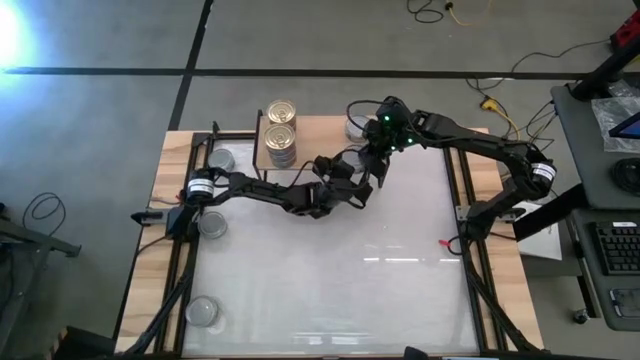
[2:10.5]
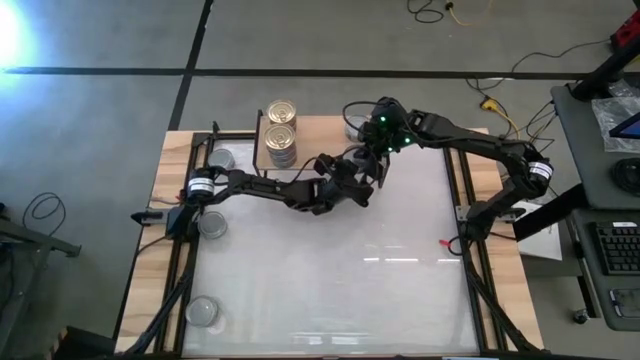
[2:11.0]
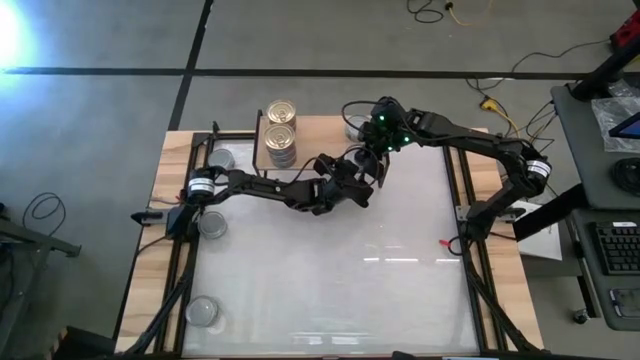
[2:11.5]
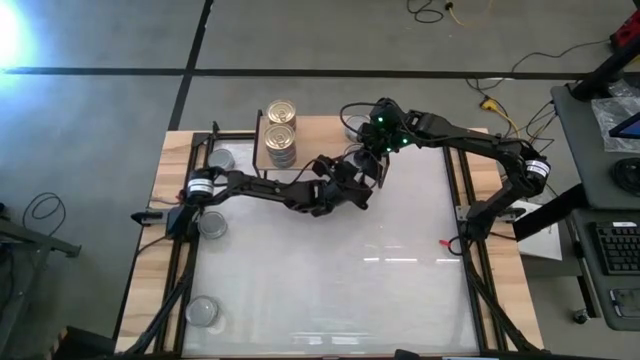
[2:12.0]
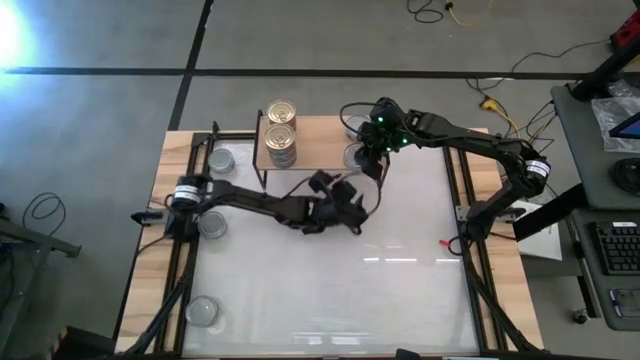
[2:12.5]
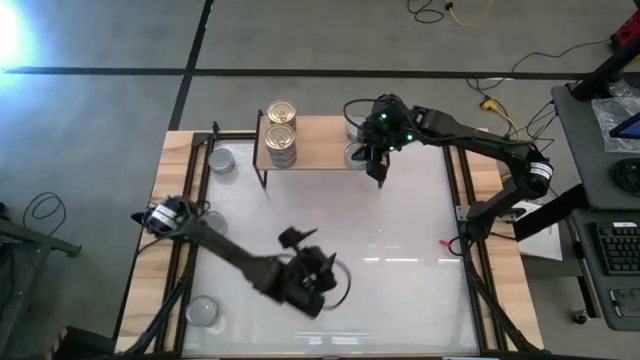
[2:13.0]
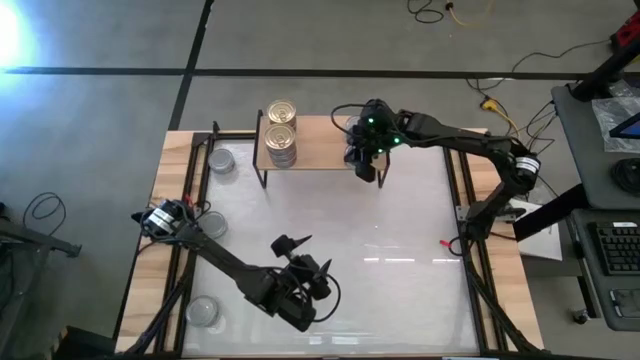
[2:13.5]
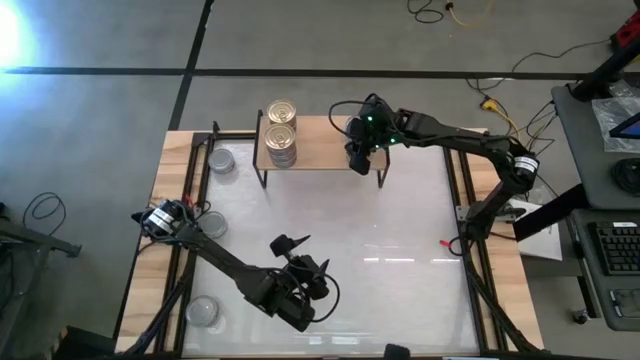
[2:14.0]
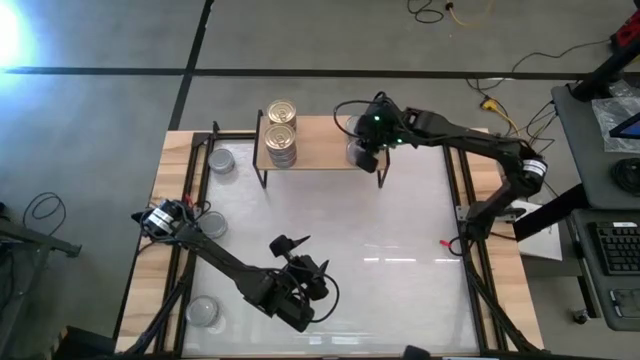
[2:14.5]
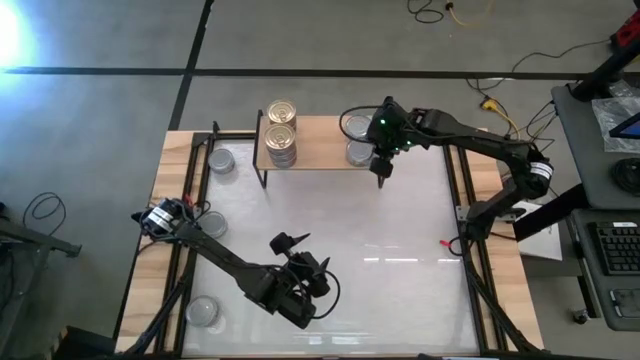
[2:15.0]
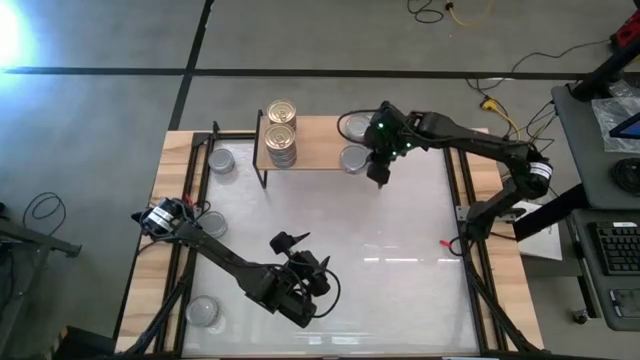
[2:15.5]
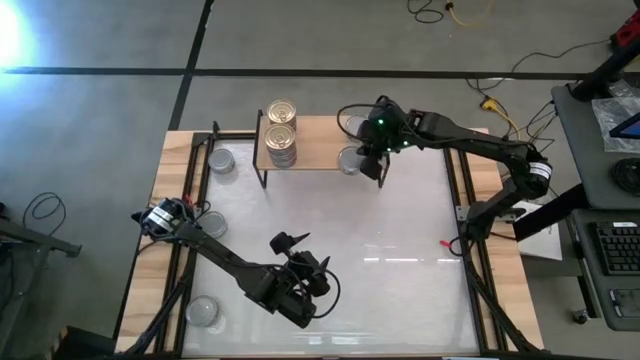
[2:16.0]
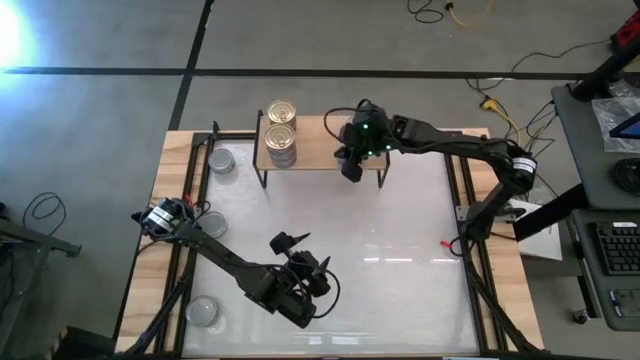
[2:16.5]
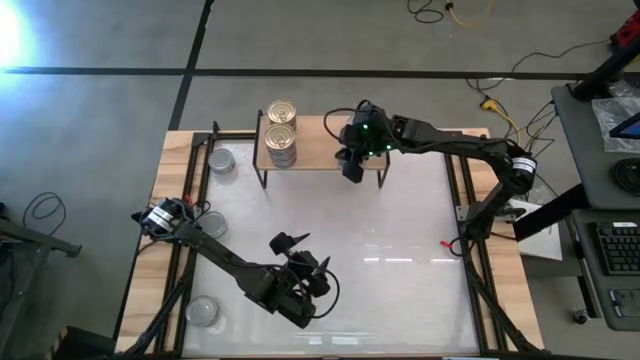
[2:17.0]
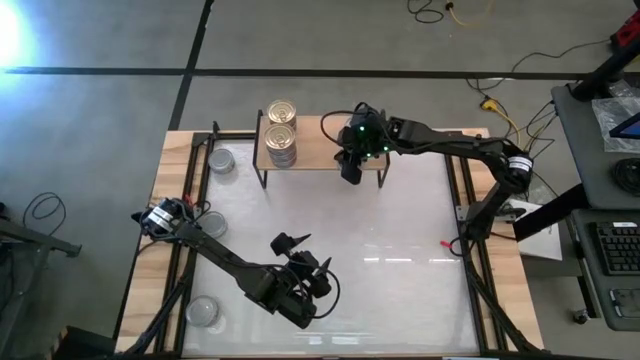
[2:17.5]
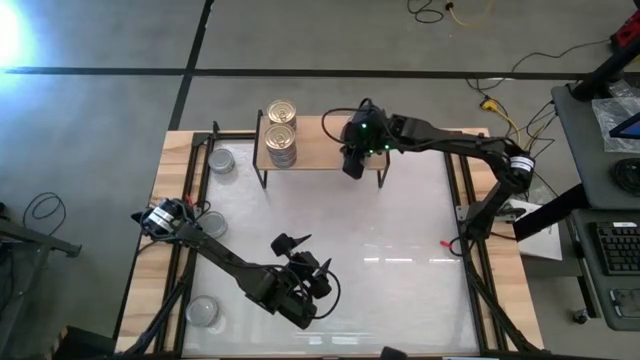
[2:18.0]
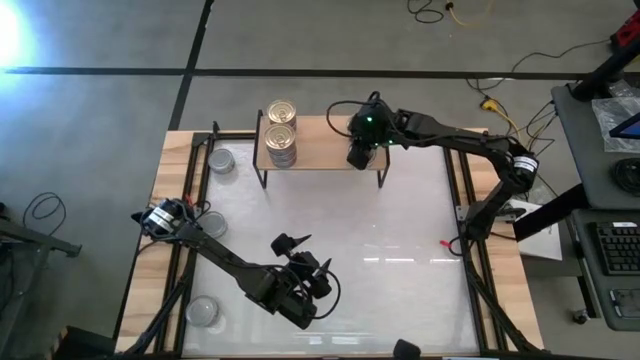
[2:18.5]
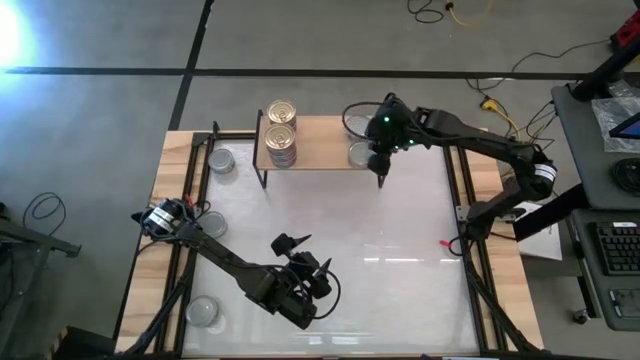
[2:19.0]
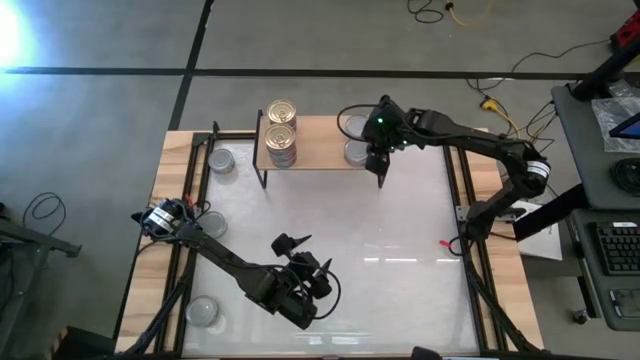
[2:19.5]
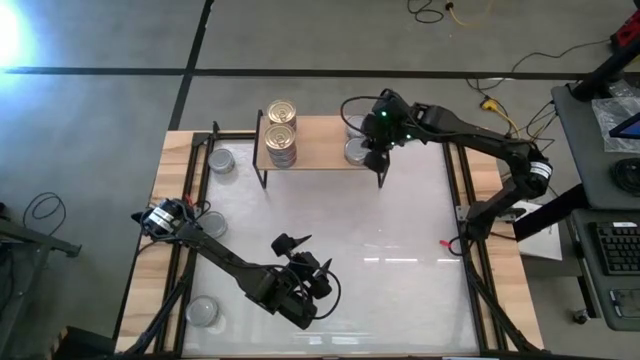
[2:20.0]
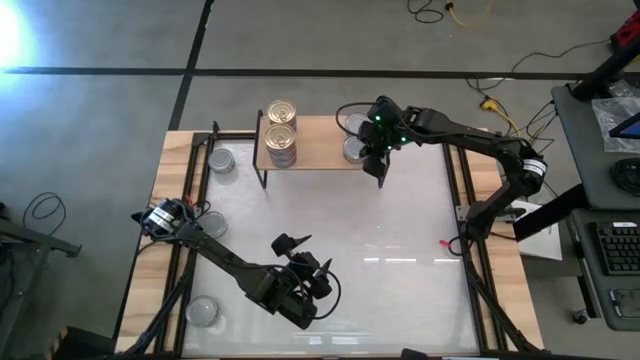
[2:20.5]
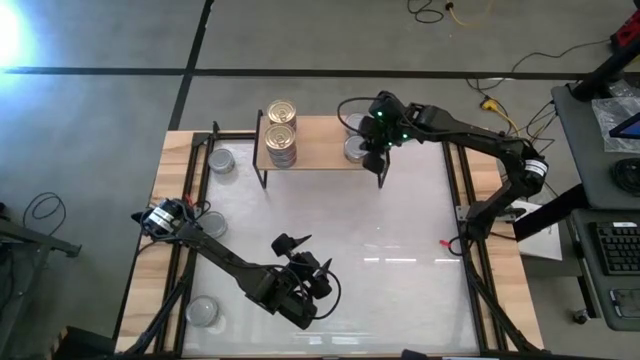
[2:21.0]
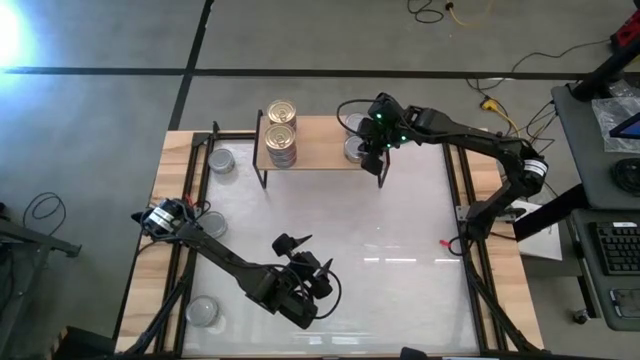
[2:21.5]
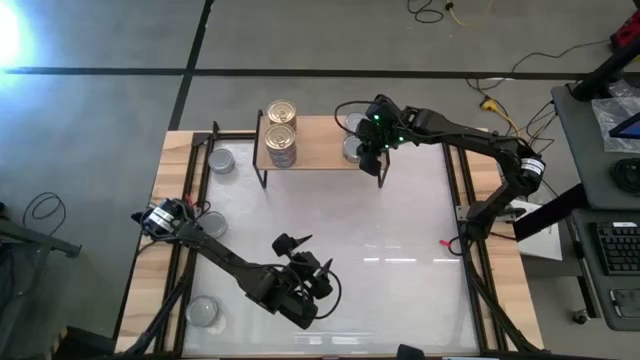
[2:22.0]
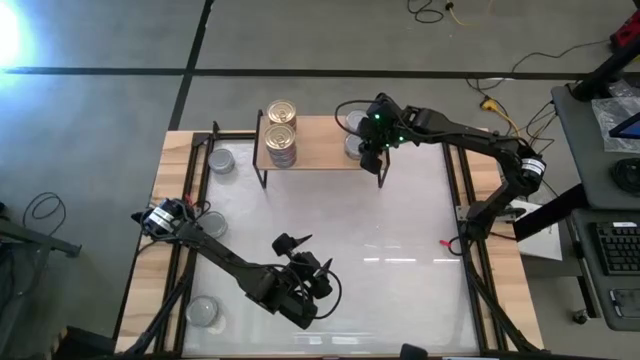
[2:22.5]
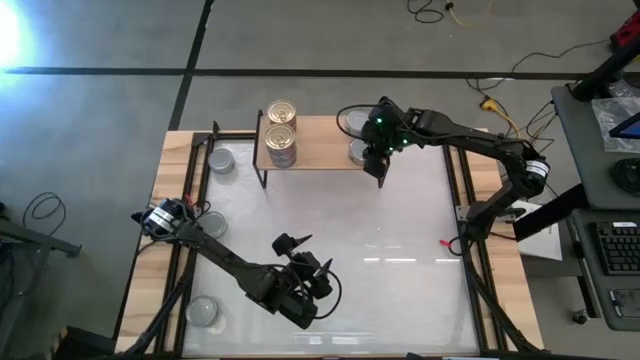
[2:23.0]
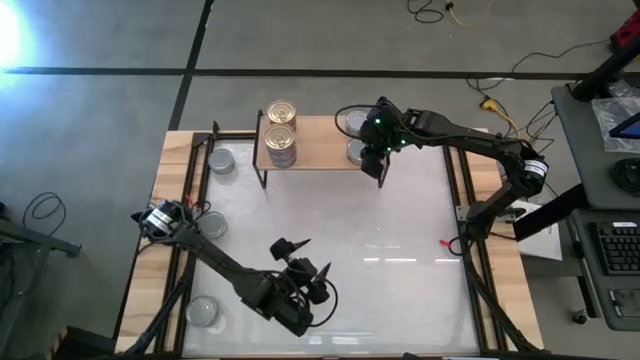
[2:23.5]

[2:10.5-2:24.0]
Task: Stack canned seafood by type on shelf
Put the green tuna can on the shelf

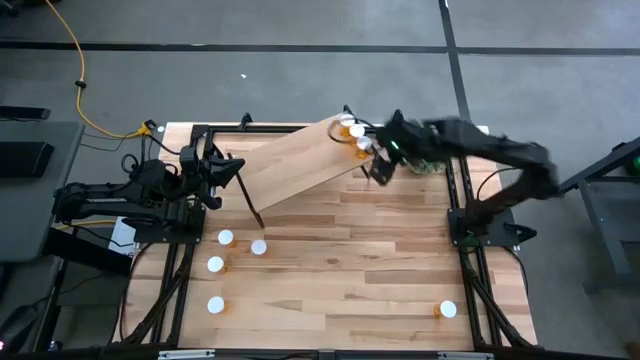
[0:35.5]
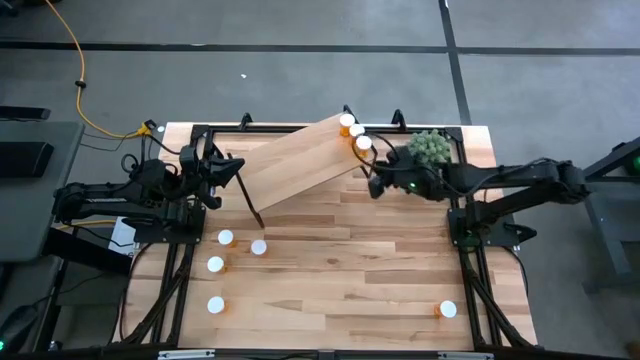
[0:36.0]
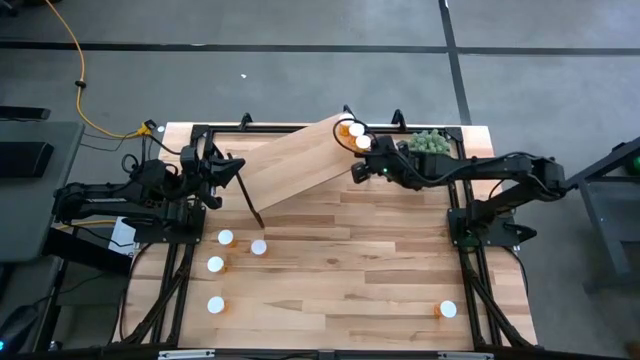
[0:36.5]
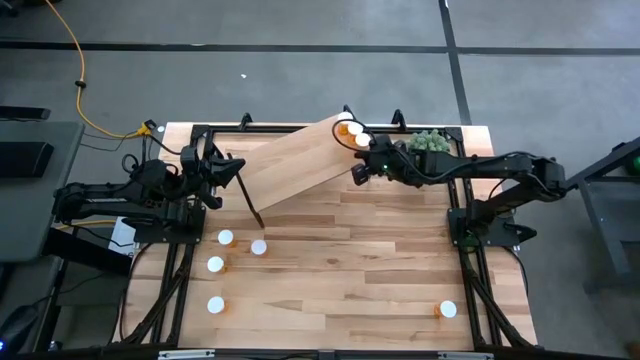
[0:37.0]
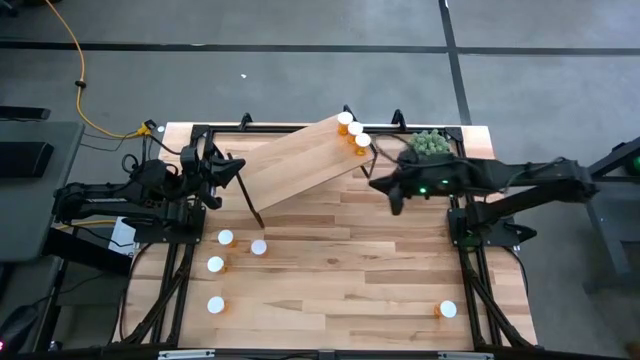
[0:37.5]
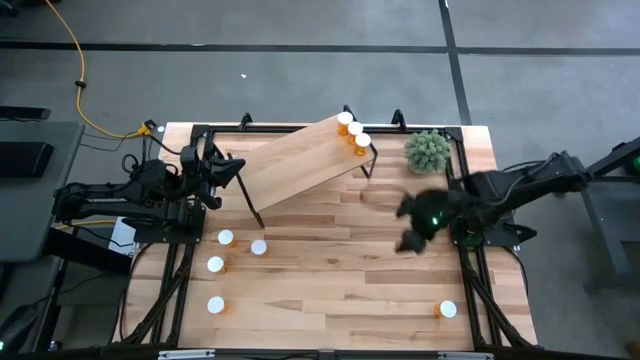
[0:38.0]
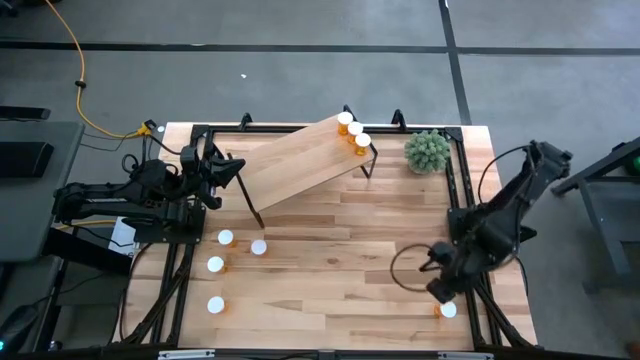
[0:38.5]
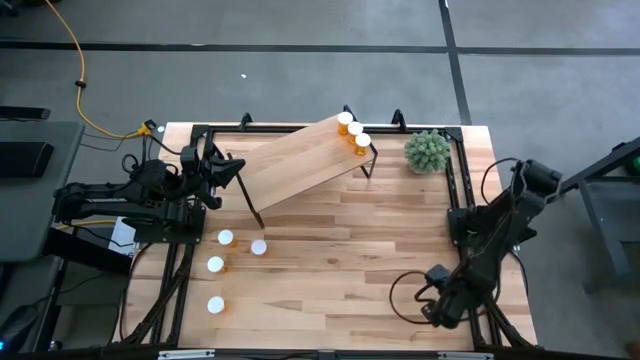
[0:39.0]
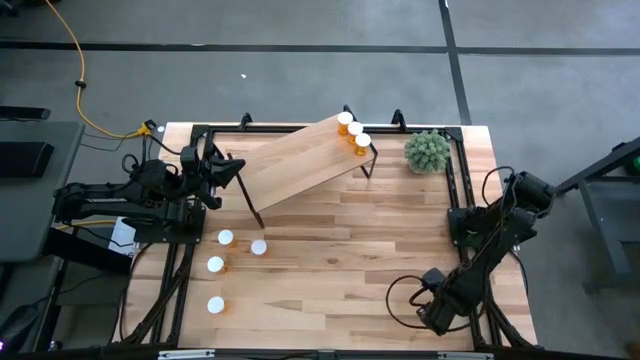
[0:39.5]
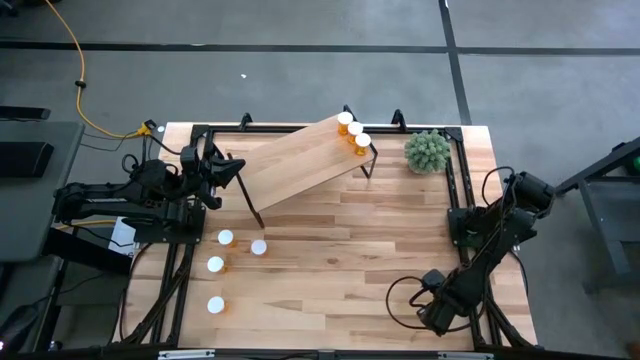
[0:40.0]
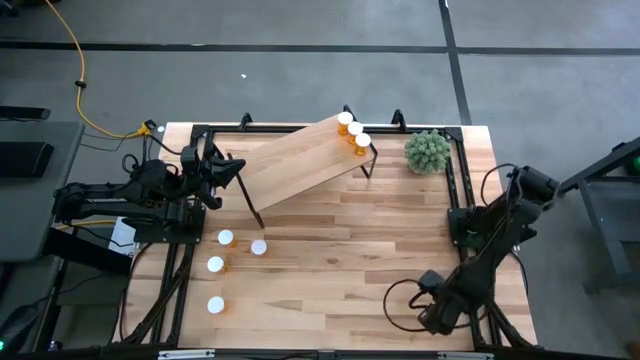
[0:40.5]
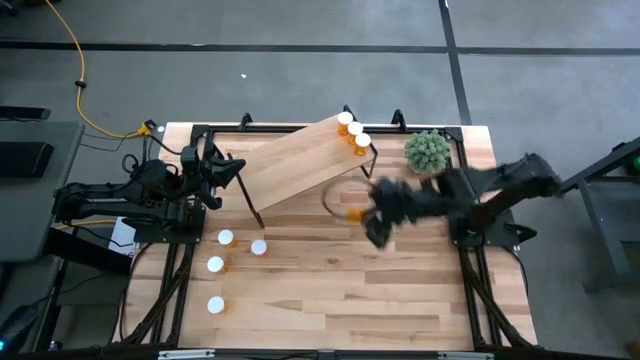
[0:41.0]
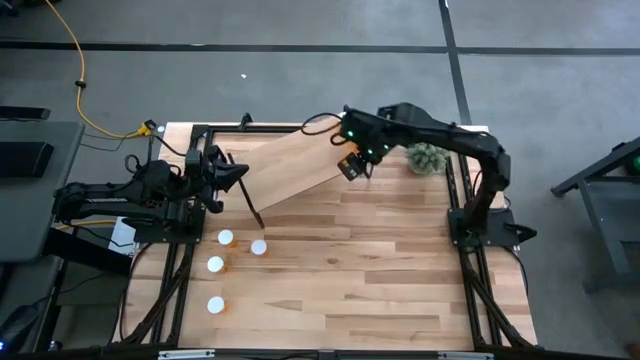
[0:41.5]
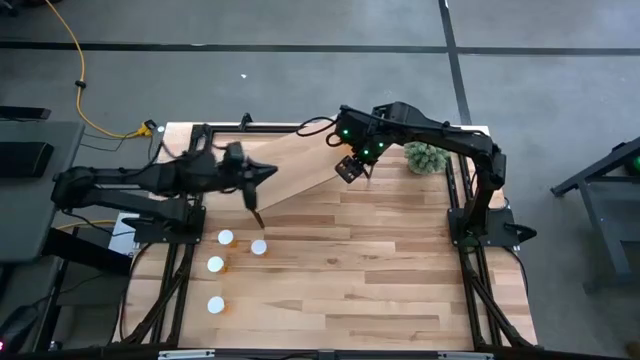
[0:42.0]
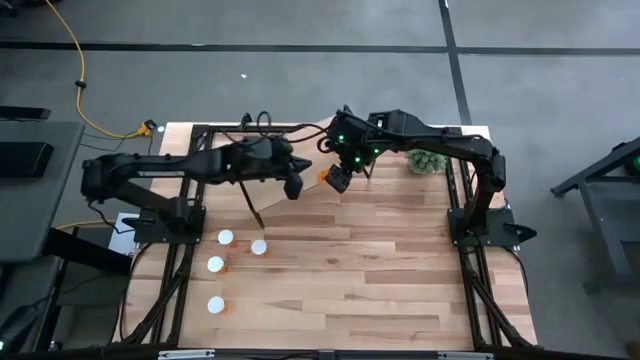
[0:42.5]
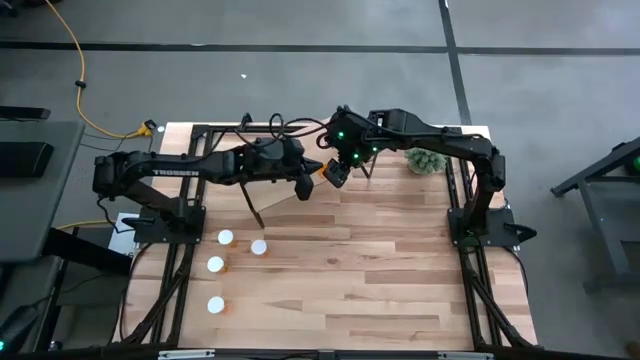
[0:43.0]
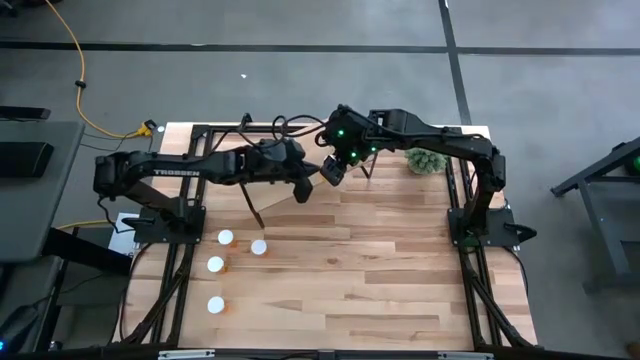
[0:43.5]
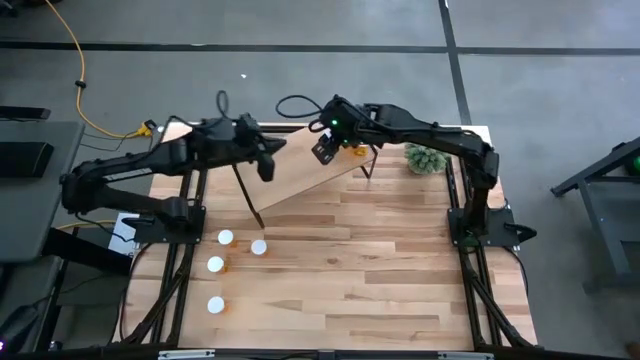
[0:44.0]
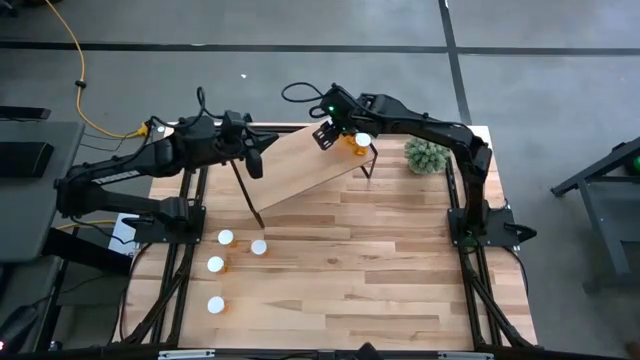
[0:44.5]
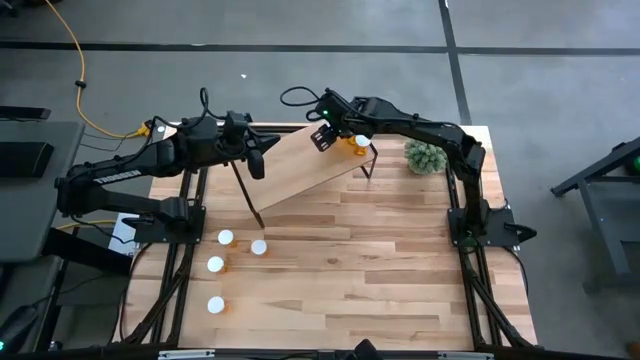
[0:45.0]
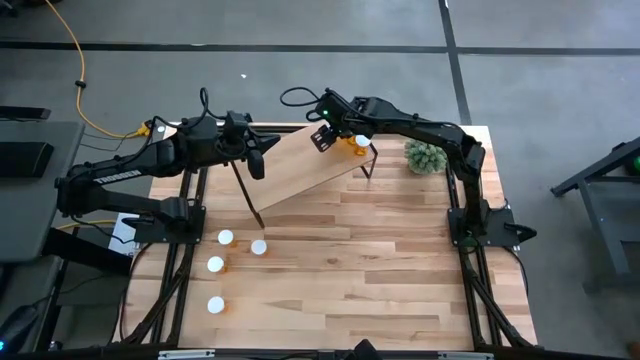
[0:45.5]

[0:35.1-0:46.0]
Task: Pick and place medicine bottles onto shelf by color
Put the pill bottle on the shelf aligned with the other pill bottles
